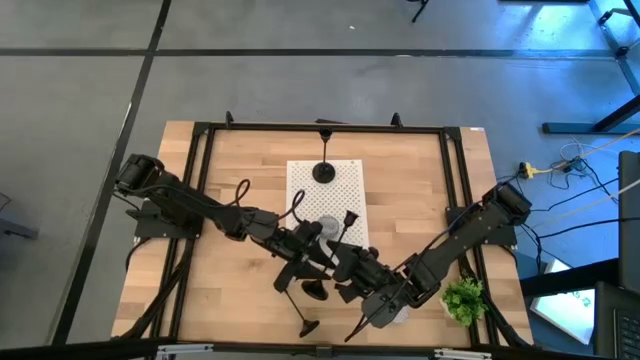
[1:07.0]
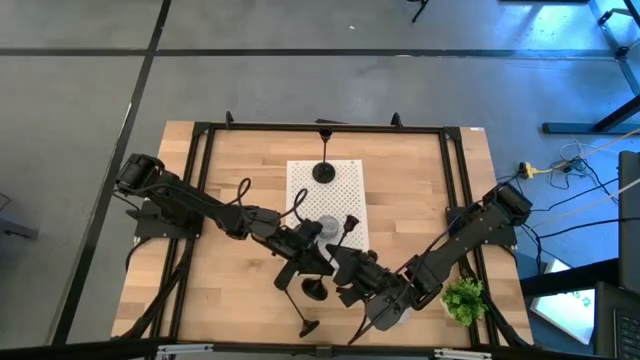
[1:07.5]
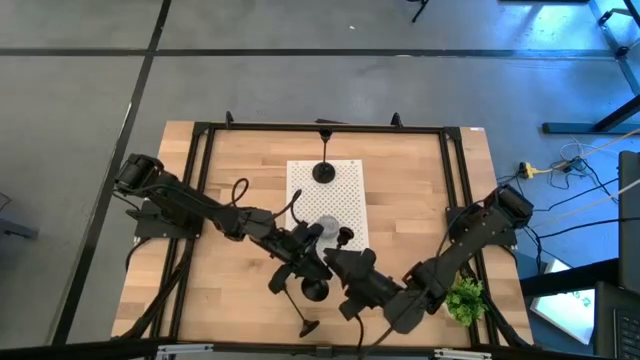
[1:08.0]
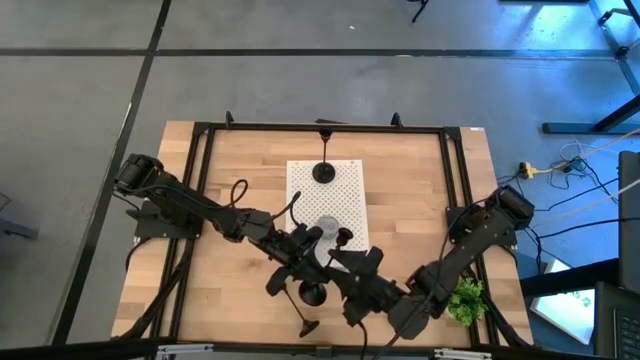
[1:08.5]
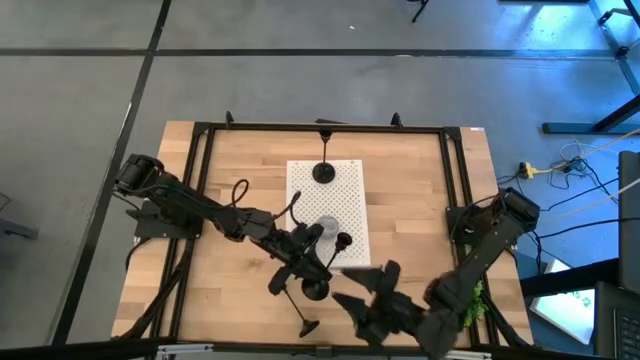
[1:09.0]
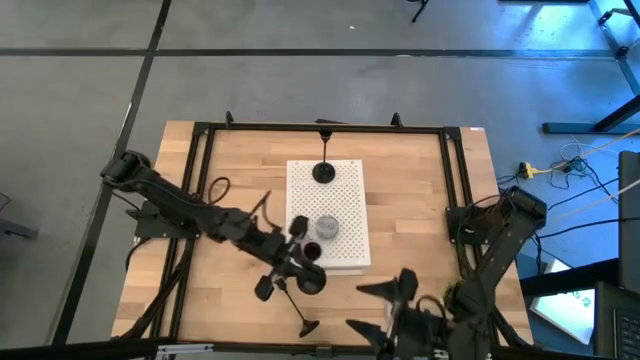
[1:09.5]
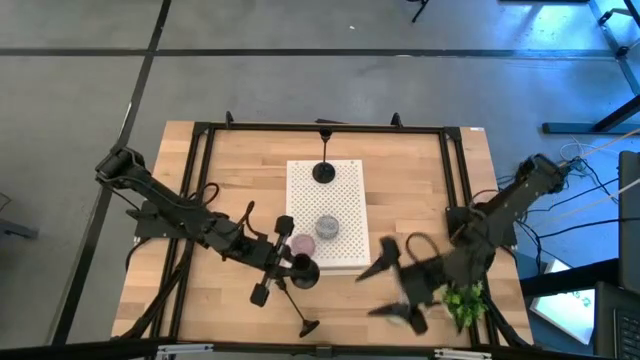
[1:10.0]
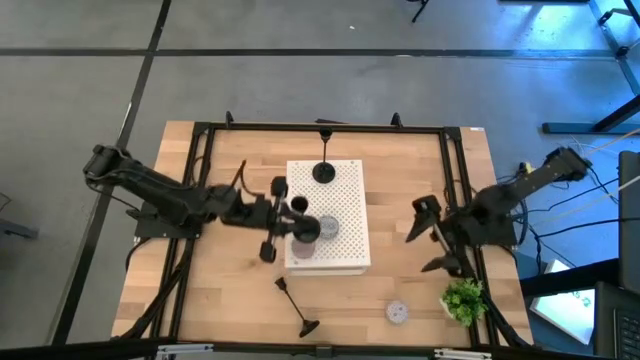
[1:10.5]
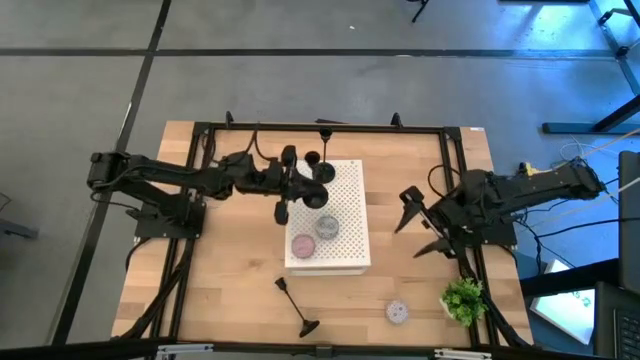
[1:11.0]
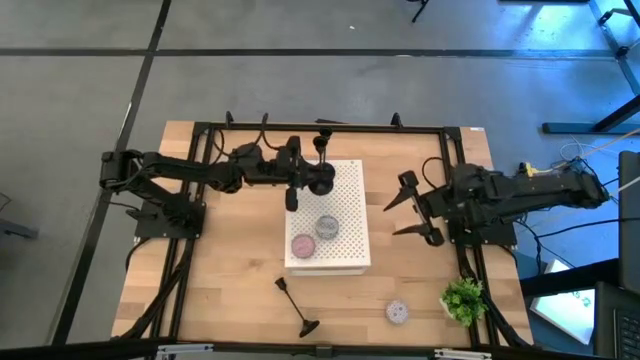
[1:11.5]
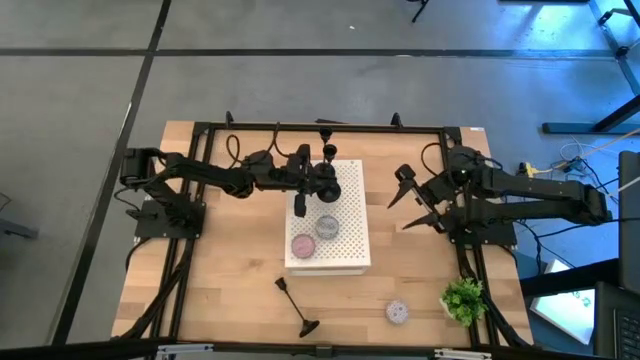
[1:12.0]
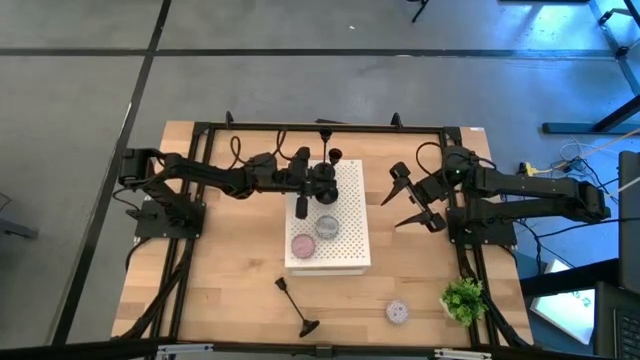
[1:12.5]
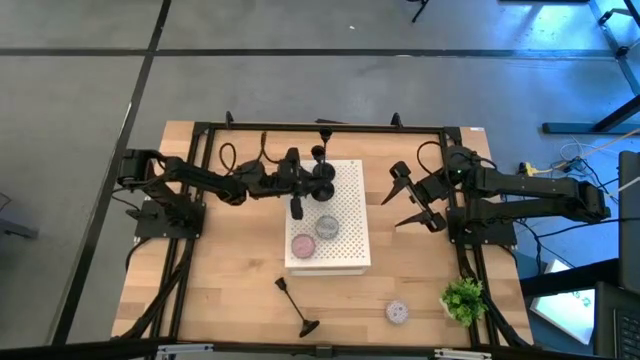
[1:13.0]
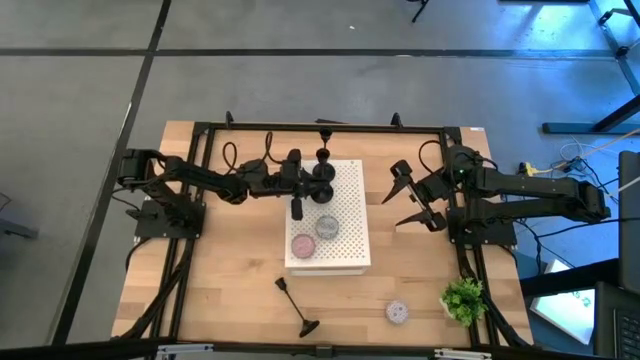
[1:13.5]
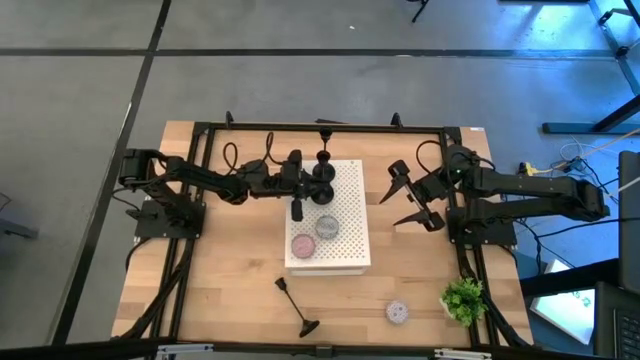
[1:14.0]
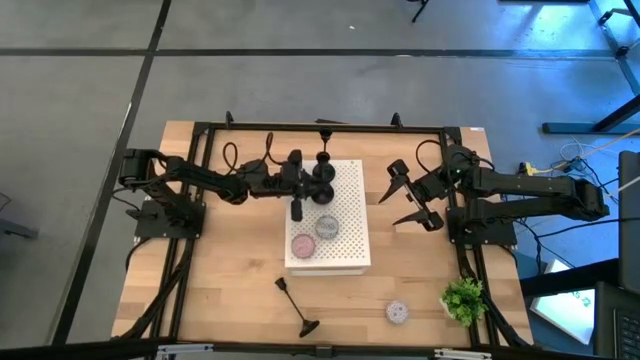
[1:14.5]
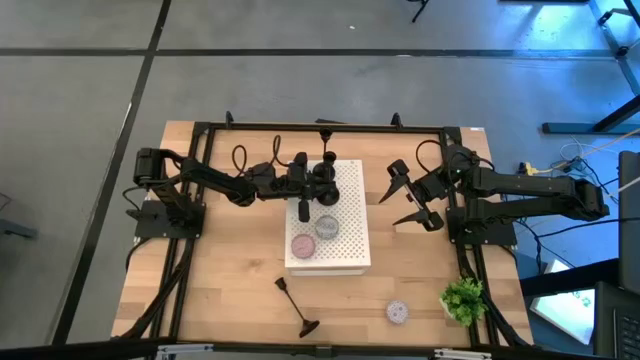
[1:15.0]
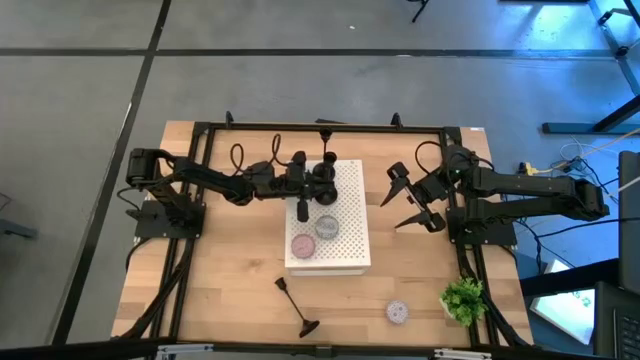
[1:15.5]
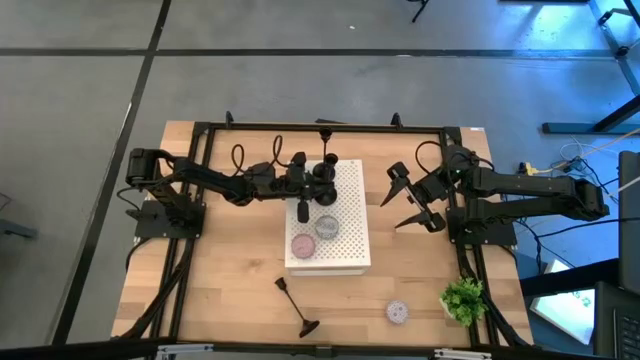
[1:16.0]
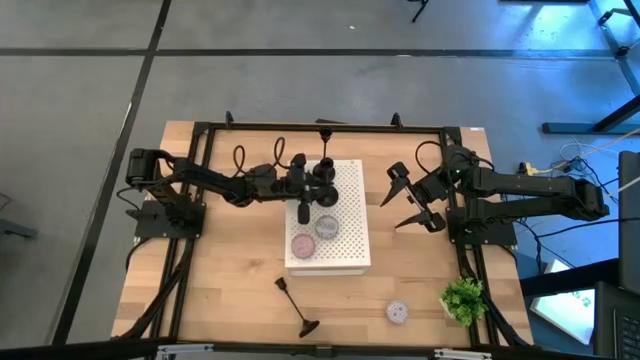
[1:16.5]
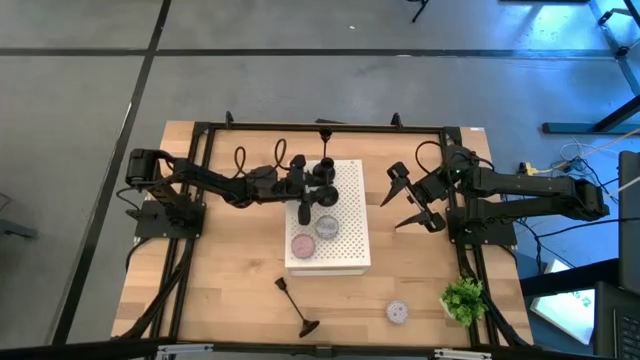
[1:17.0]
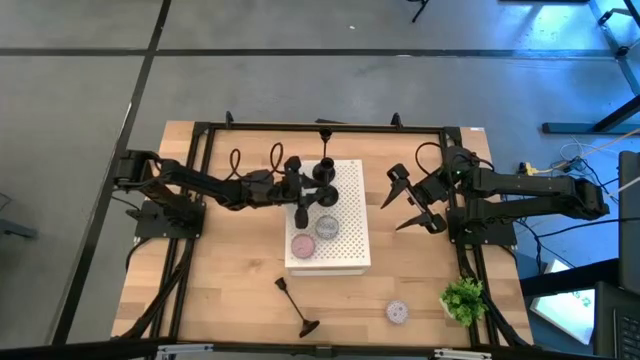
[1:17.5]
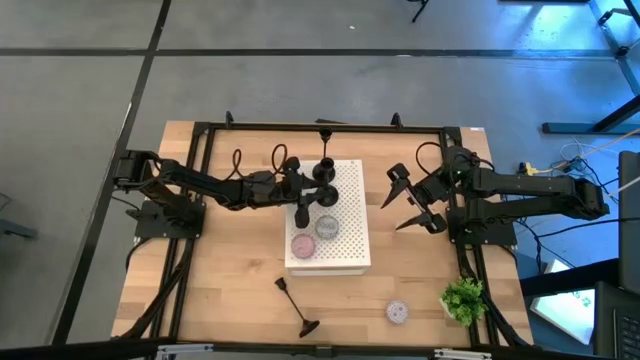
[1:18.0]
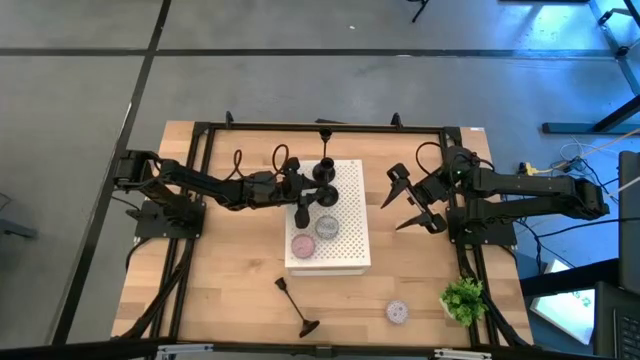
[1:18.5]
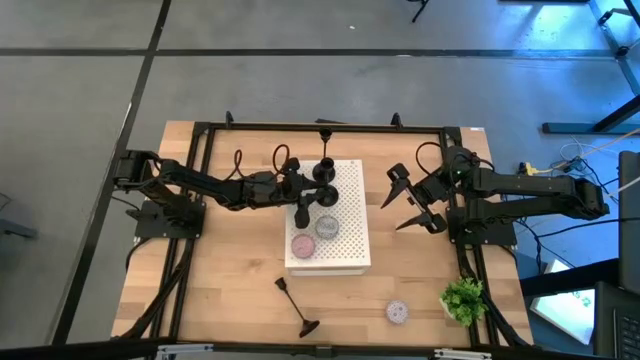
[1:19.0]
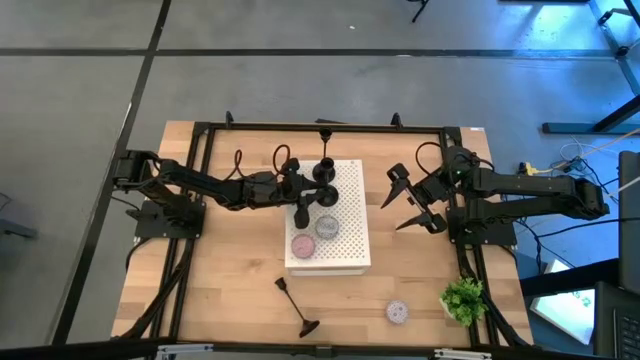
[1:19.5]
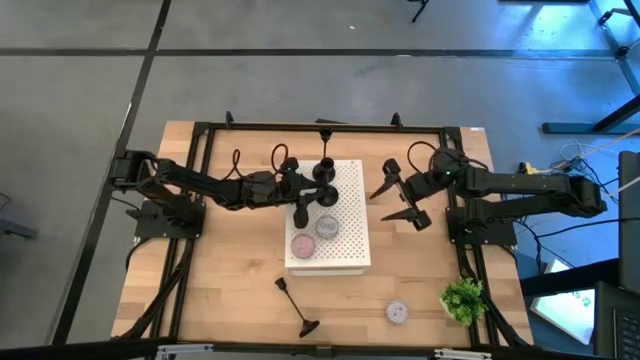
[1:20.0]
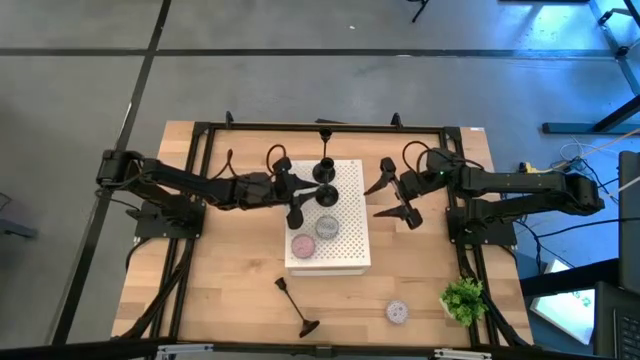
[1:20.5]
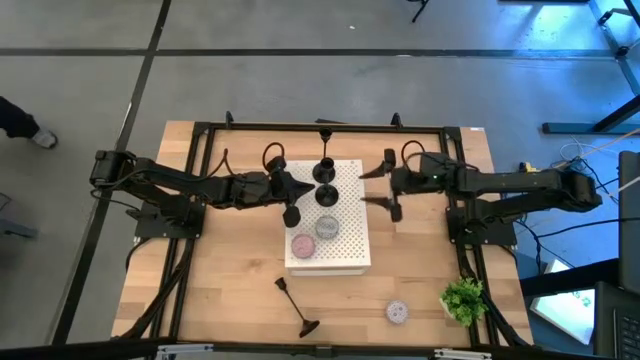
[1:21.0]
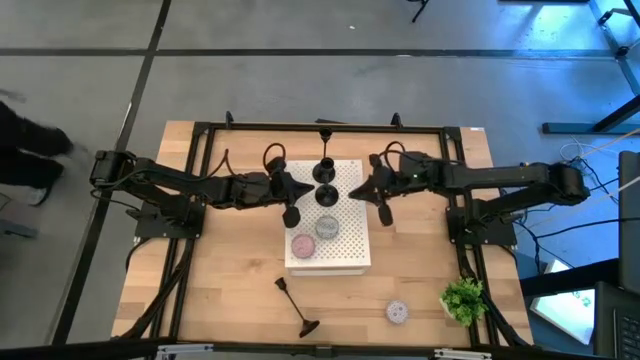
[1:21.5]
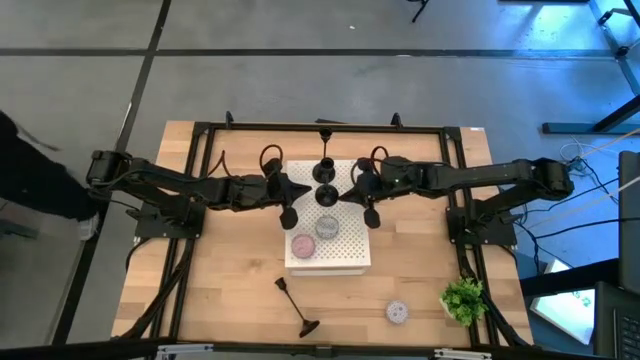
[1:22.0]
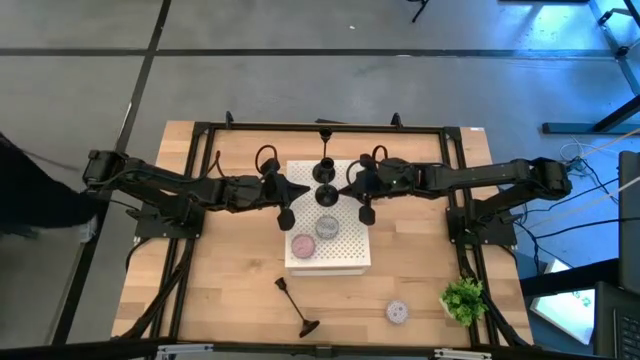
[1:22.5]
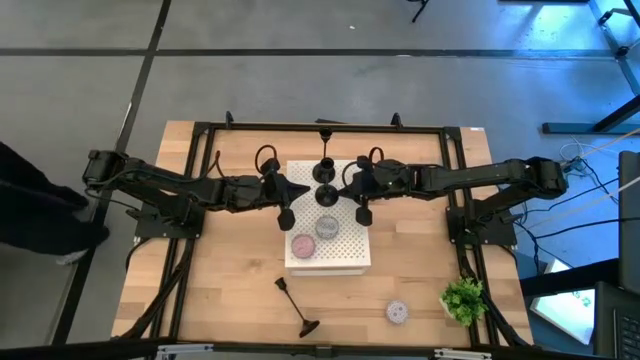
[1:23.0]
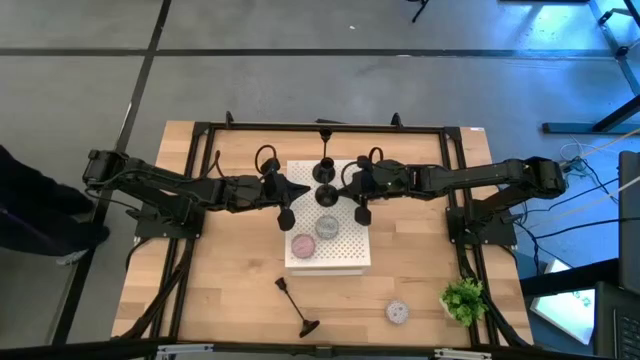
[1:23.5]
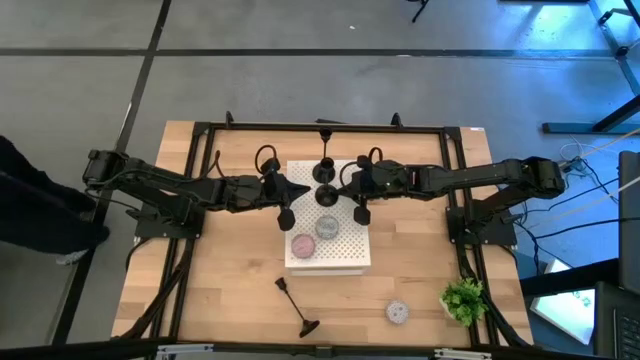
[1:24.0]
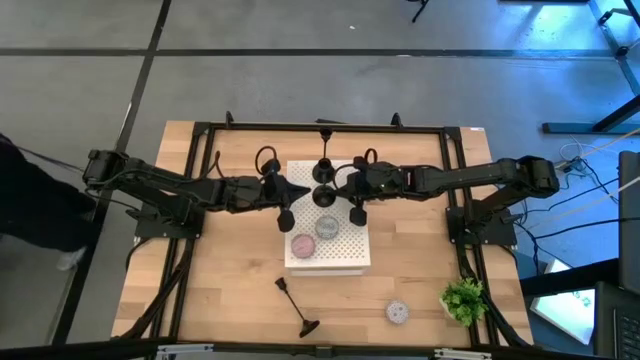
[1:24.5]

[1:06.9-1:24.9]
Task: Pick & Place candle stick holders
Put the top black candle holder on the shelf

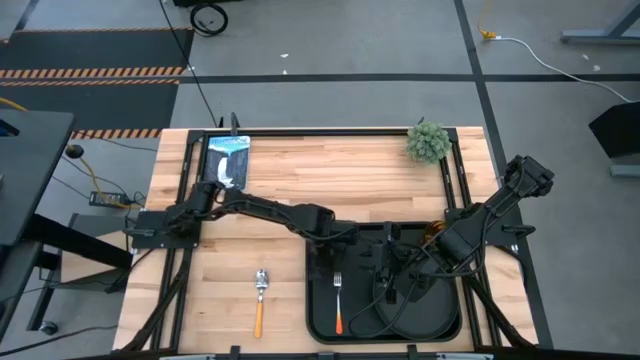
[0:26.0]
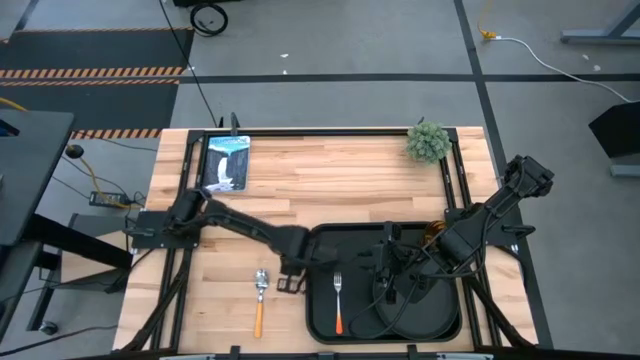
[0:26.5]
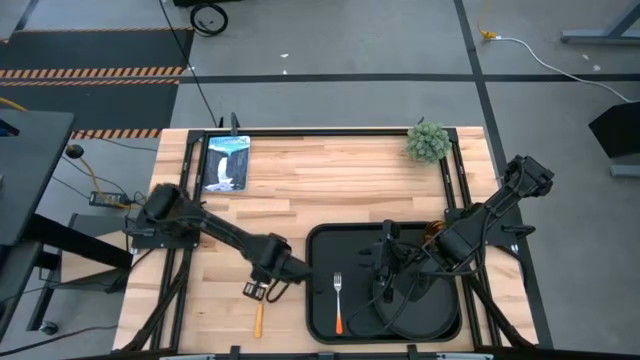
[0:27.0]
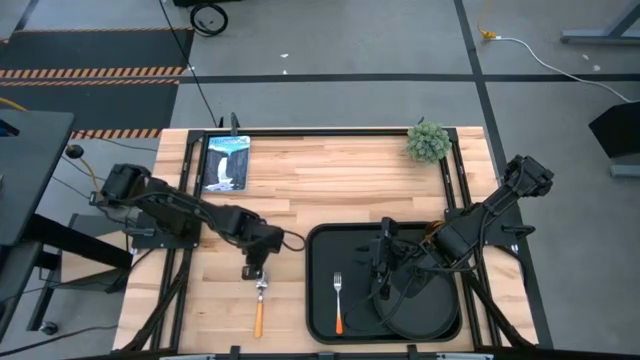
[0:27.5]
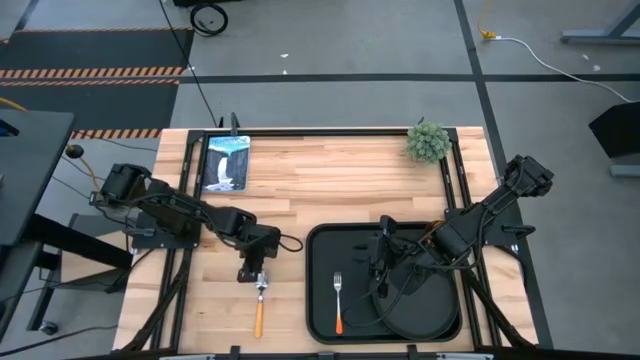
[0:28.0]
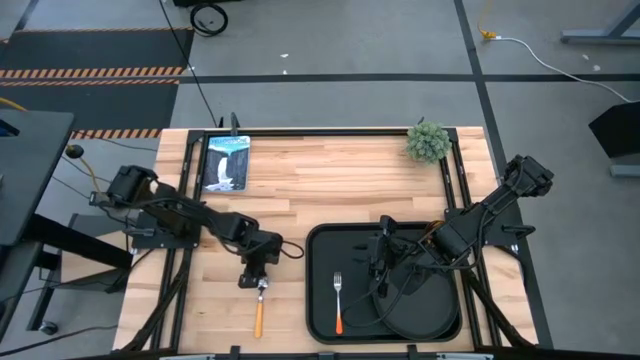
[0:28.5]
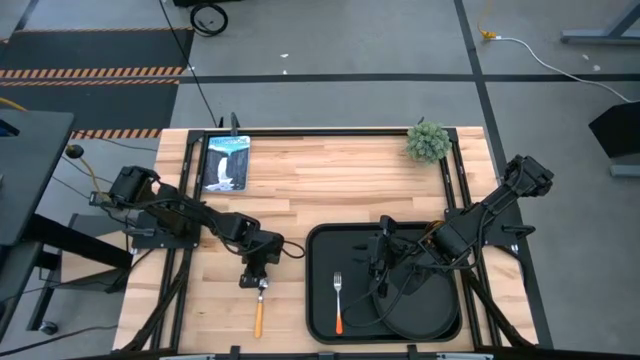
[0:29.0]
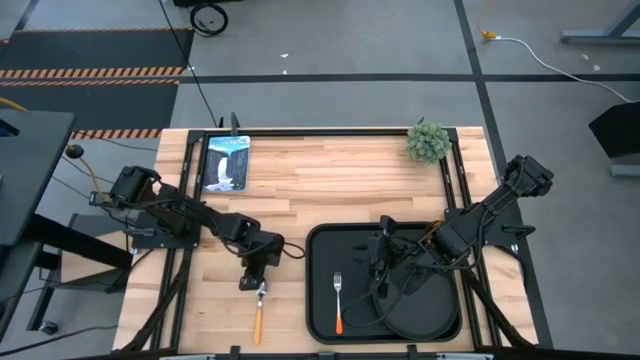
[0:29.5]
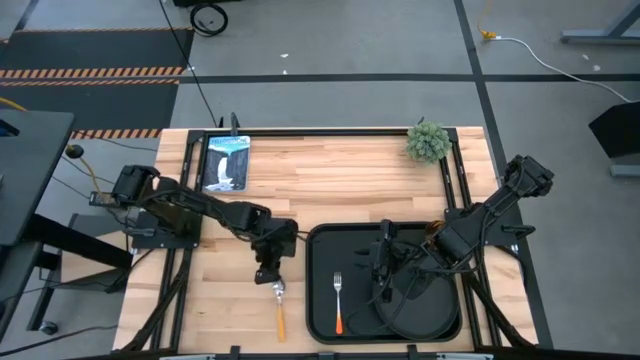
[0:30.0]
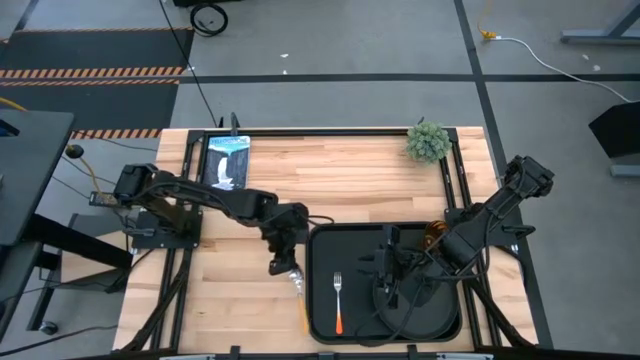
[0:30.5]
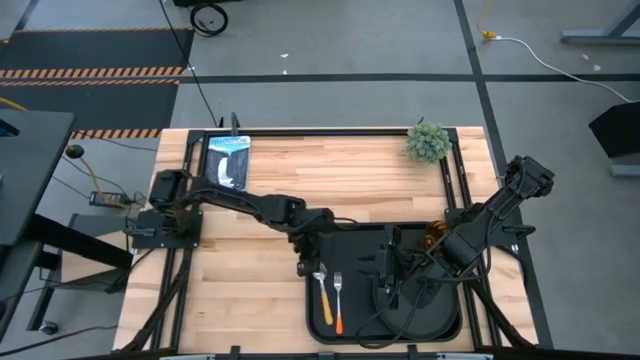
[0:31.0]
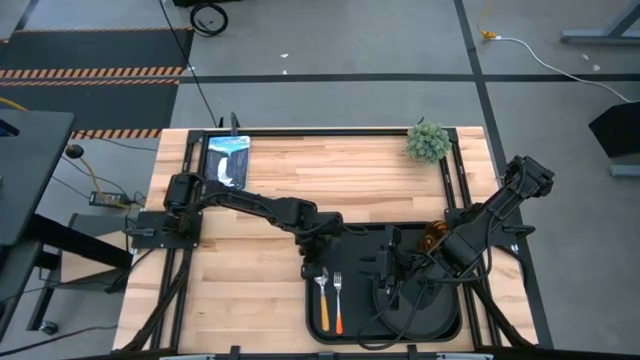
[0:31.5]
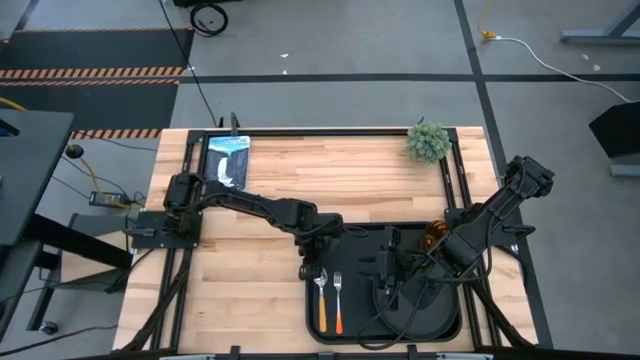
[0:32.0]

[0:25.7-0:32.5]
Task: Pick and place plate/cup/fork/spoon on tray
Put the yellow spoon on the black tray
